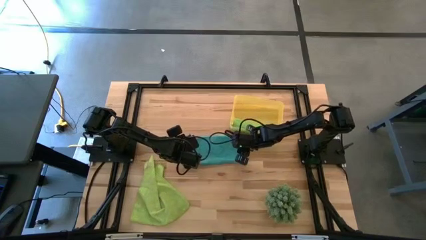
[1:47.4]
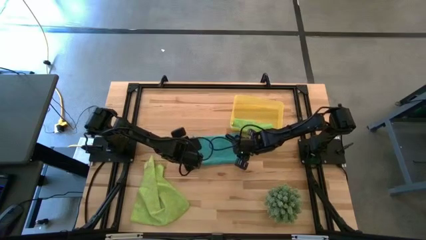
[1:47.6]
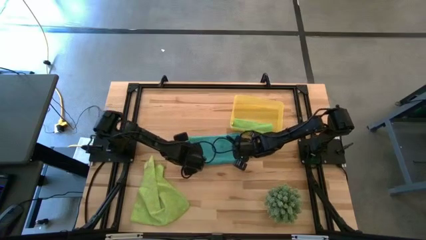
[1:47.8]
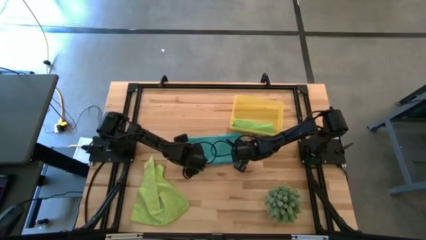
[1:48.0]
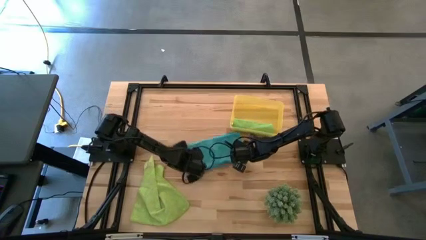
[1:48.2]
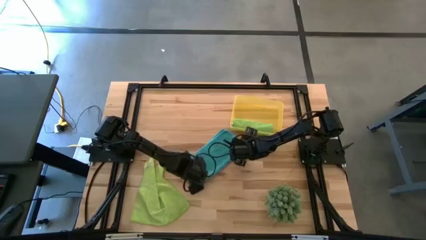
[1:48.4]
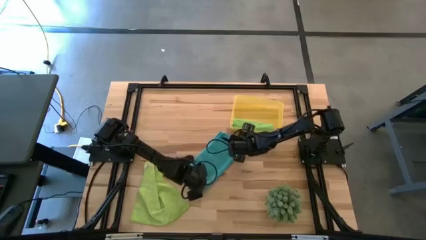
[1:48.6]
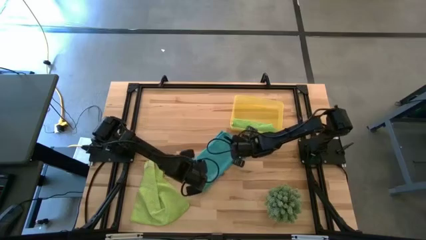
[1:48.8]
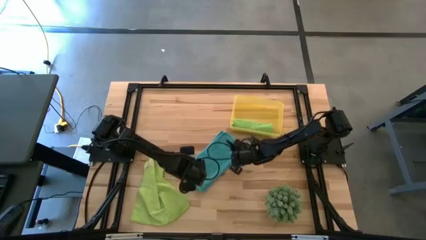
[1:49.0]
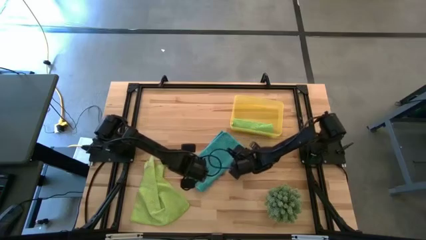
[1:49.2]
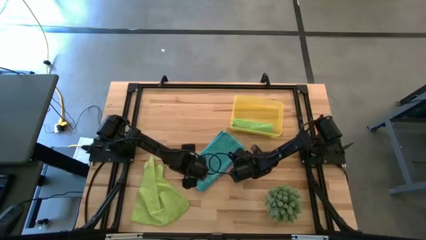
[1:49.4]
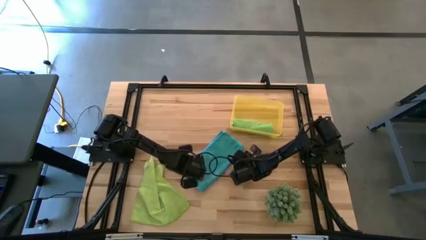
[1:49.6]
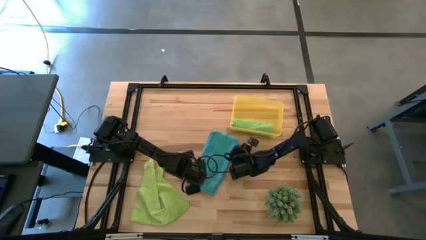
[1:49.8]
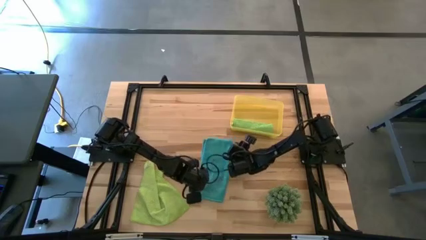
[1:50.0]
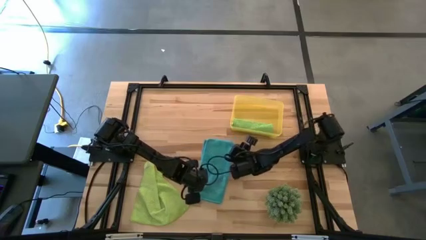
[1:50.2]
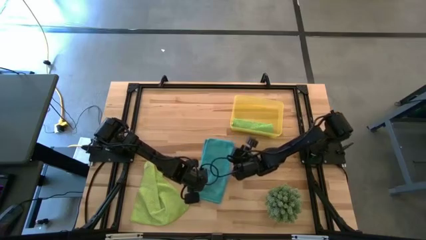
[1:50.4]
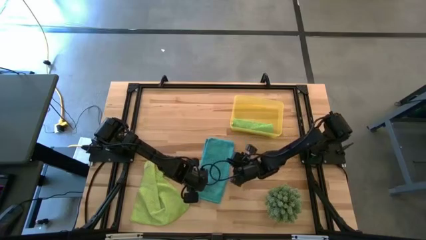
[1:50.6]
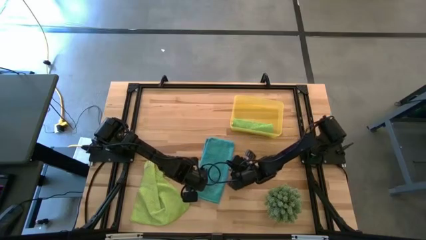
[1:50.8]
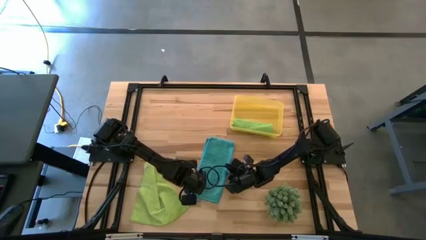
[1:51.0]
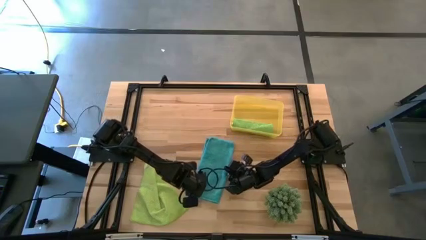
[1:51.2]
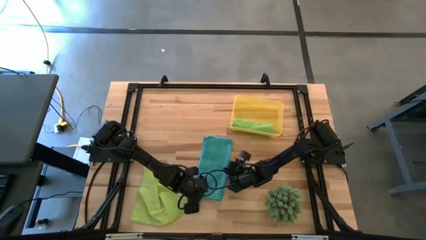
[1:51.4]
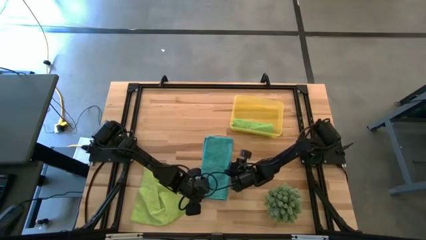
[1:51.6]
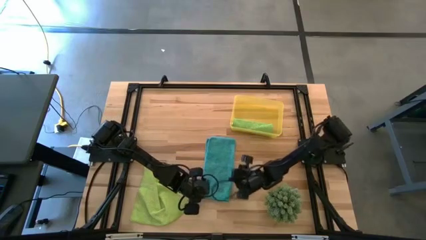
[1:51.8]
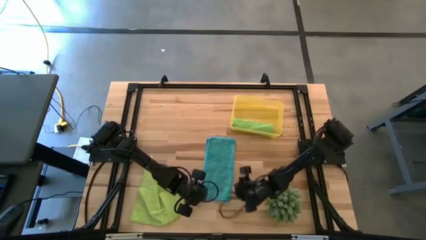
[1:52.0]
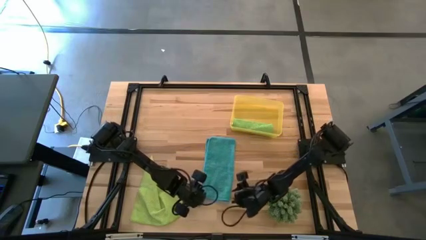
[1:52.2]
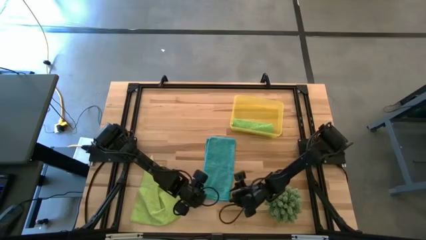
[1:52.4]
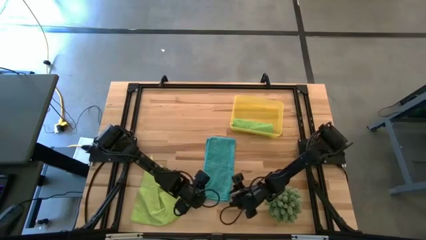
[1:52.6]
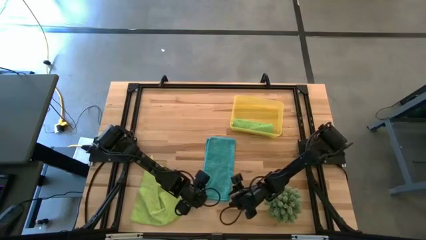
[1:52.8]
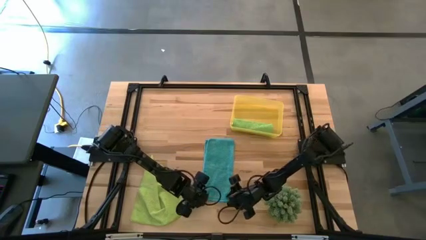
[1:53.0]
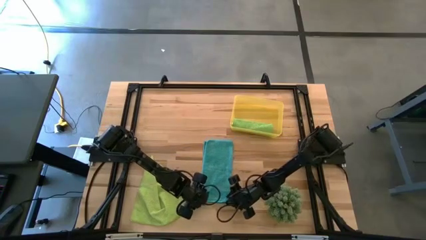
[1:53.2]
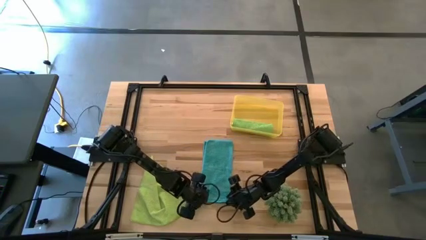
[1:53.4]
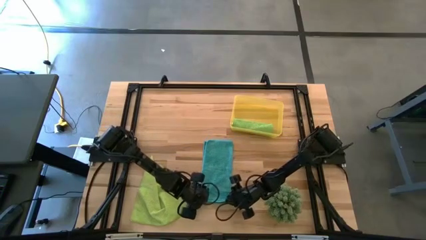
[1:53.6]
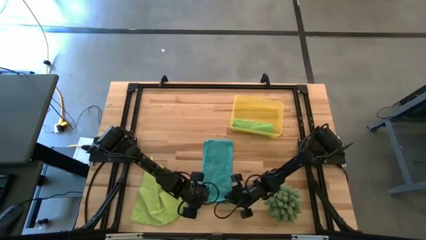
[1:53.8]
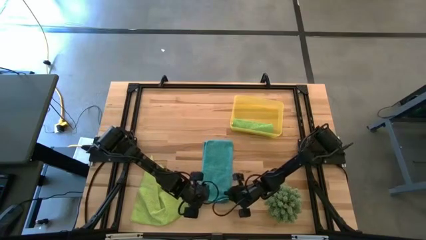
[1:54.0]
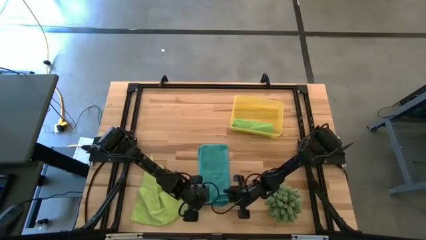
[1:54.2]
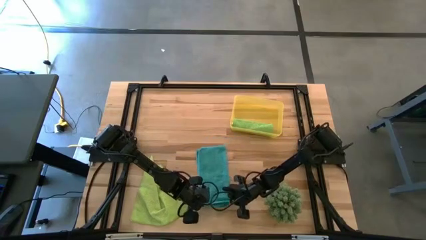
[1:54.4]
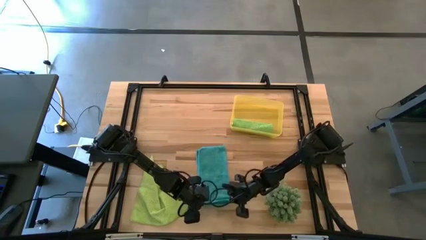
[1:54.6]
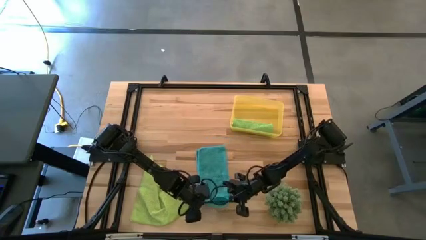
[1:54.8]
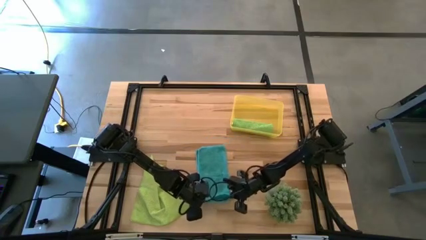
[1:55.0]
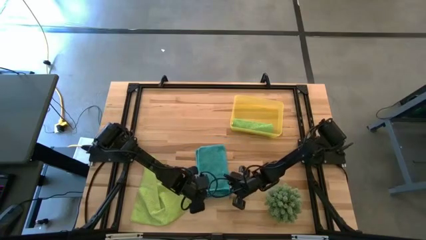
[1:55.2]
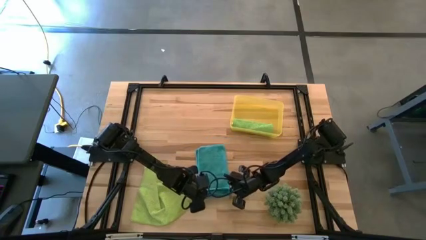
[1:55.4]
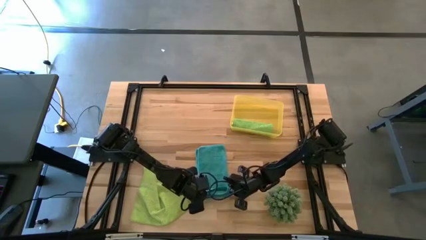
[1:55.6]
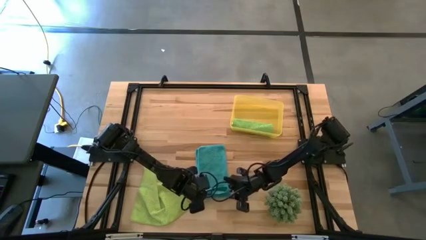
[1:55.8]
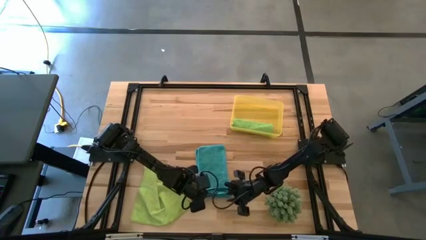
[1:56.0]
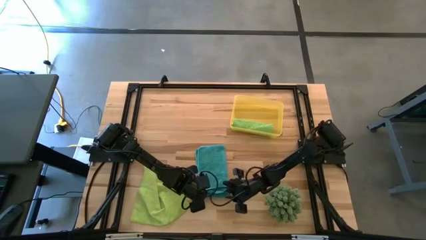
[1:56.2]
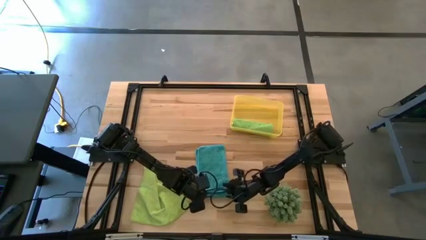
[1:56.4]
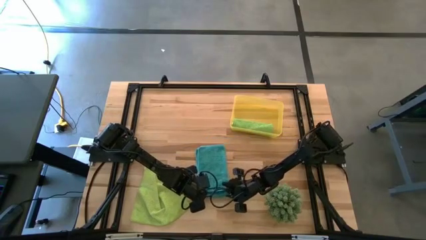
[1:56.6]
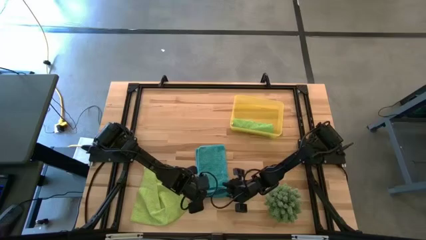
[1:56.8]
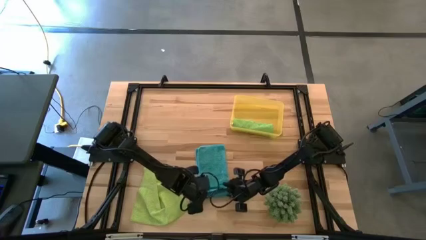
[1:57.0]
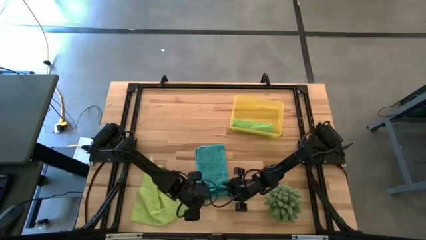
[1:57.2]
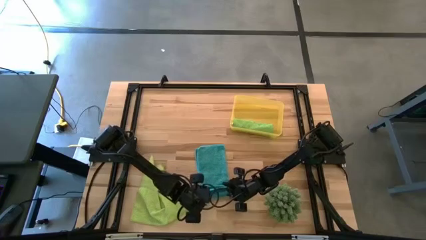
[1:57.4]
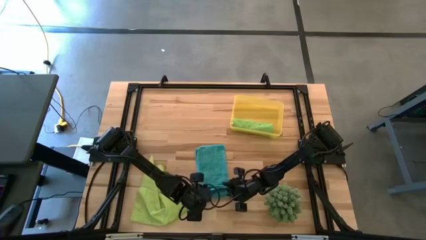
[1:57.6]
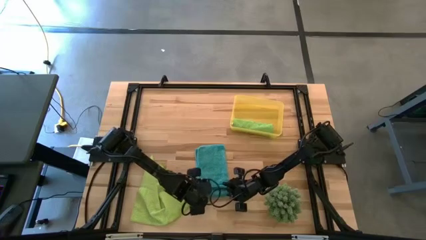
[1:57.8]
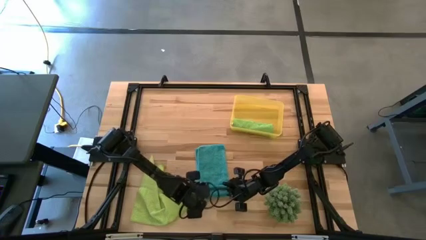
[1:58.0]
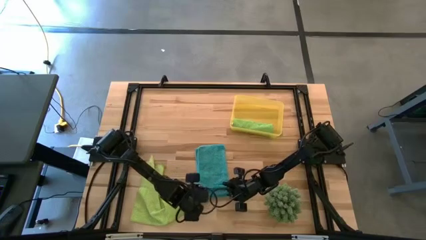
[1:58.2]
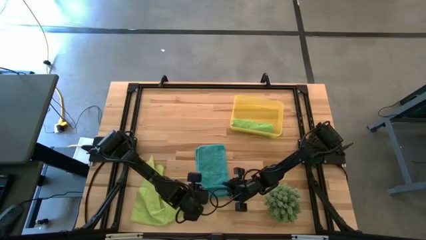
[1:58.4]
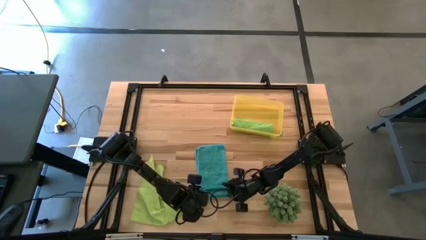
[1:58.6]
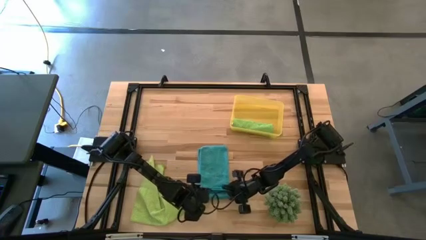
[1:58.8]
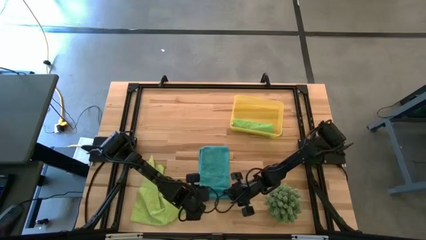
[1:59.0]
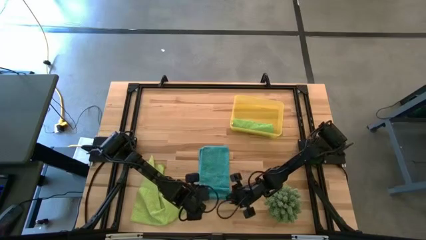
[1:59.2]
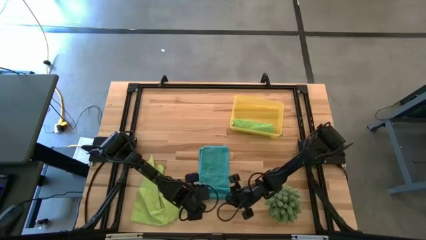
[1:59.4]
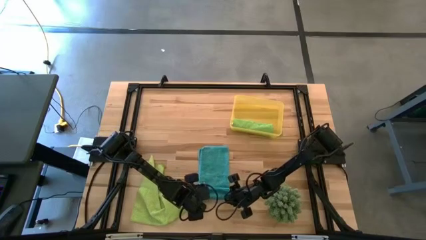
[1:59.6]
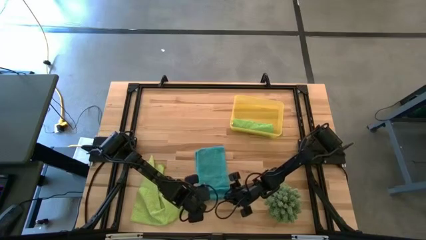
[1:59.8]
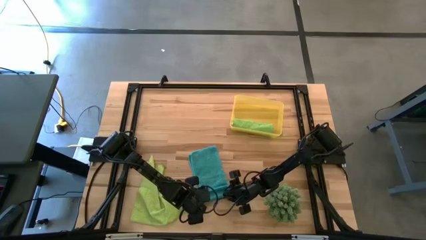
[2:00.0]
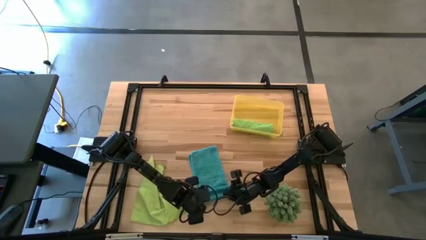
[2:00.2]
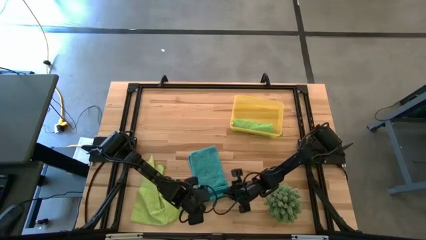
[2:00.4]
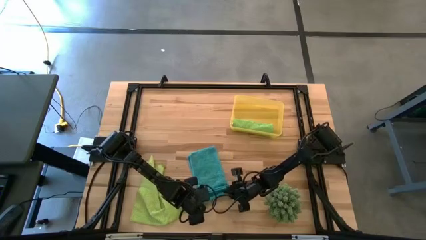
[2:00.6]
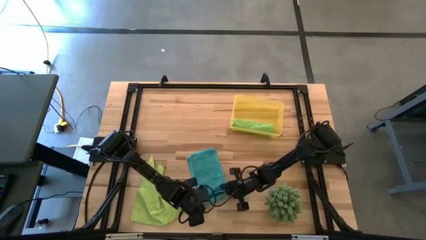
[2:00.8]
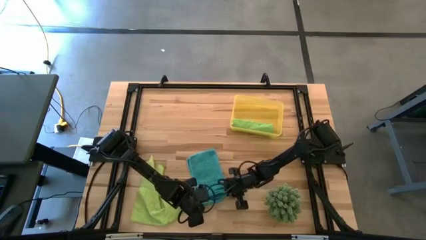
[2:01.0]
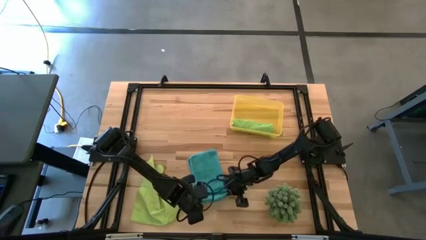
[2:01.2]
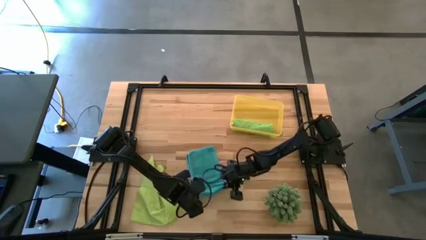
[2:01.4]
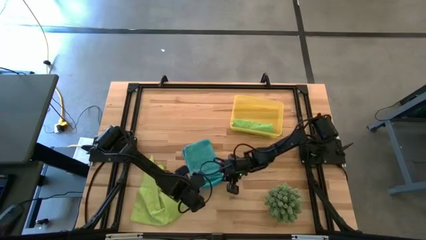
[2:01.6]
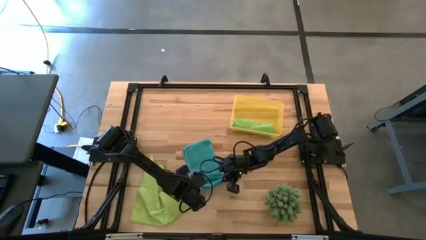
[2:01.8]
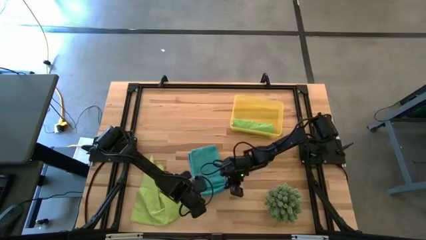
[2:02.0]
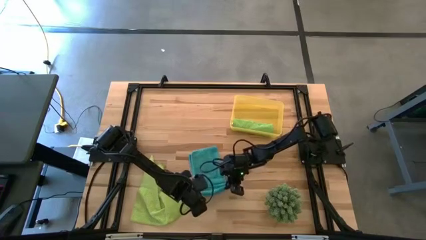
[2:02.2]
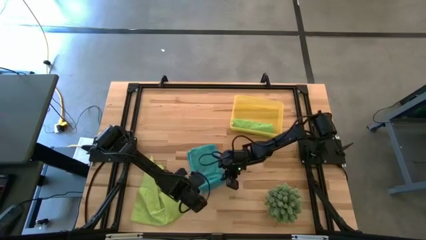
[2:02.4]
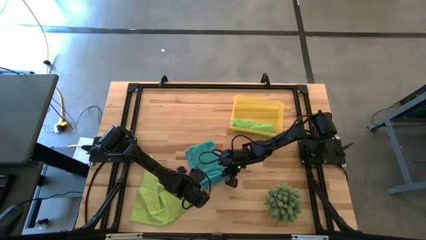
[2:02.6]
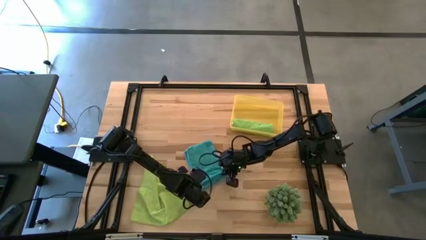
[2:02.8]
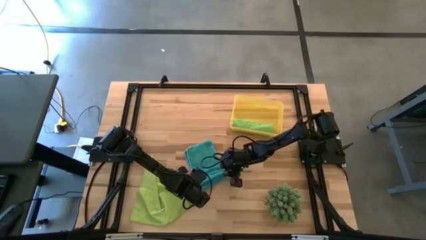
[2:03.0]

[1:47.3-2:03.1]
Task: Roll microfiber towels into tight, uniform cylinder then place into a basket
Roll the blue microfiber towel

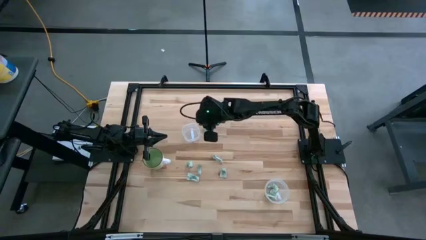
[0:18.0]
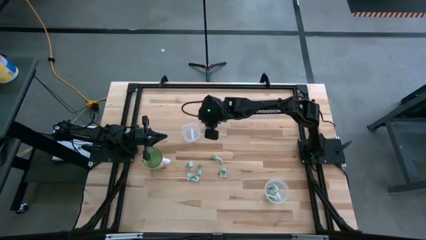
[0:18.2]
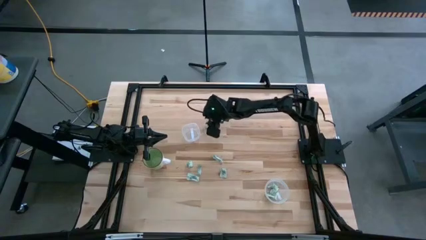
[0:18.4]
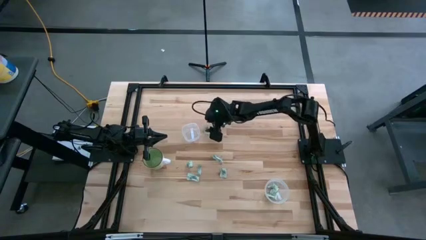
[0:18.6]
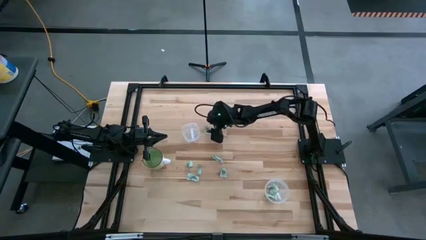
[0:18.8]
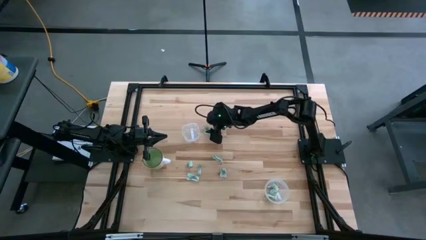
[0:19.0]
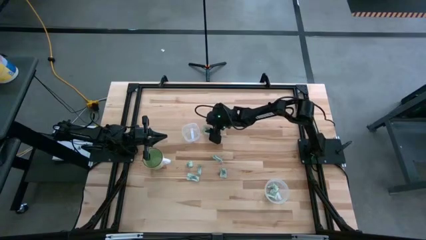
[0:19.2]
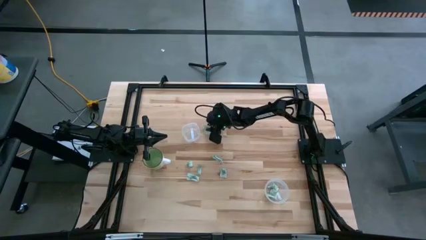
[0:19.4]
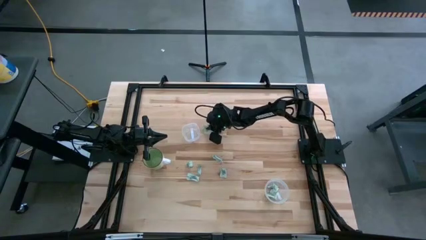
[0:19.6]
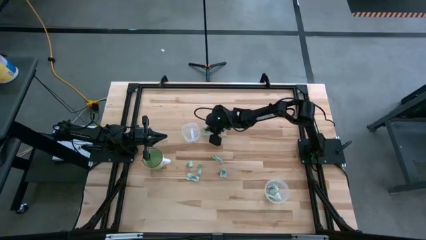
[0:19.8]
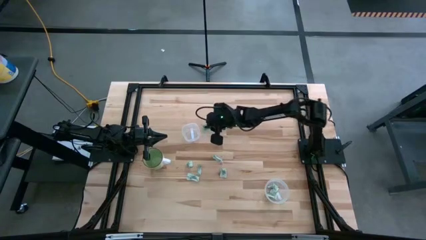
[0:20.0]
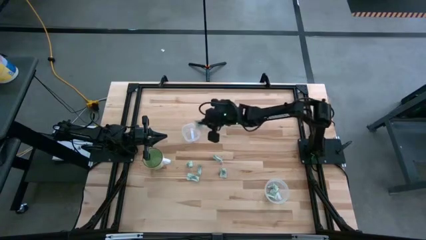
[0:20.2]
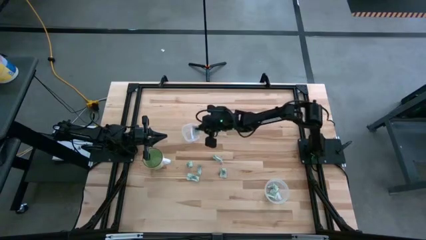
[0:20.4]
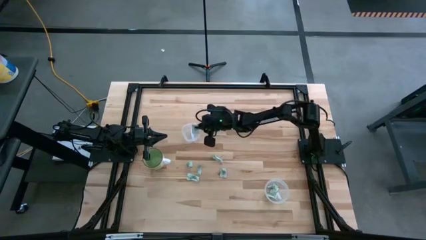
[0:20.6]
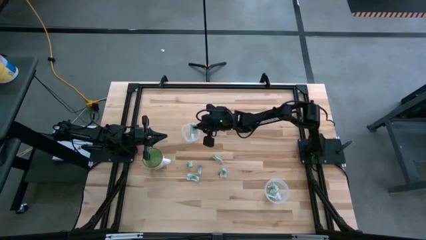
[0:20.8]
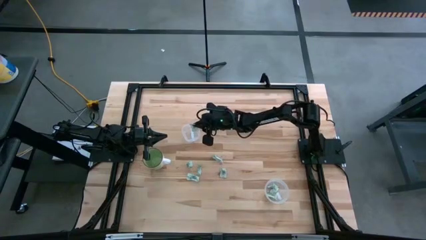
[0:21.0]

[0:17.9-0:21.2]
Task: Pick and place items into bin
Put the green stevia packet into the top transparent bin
